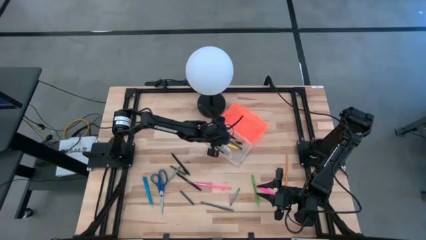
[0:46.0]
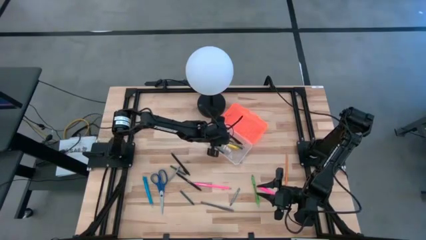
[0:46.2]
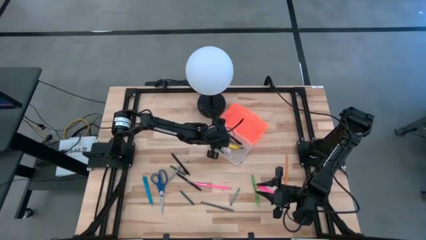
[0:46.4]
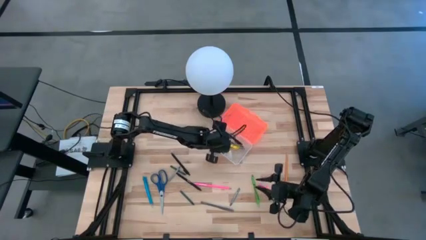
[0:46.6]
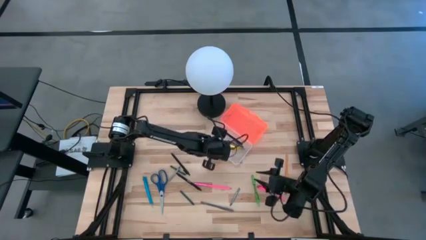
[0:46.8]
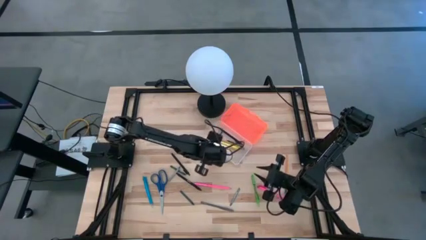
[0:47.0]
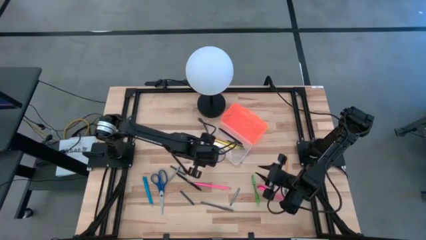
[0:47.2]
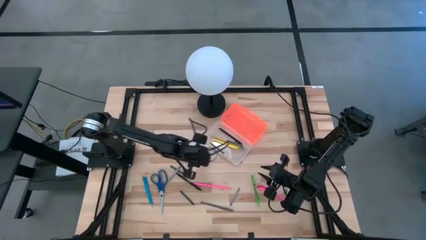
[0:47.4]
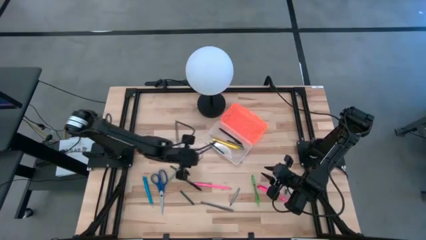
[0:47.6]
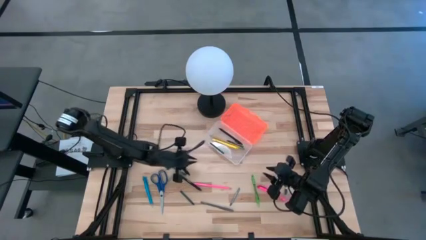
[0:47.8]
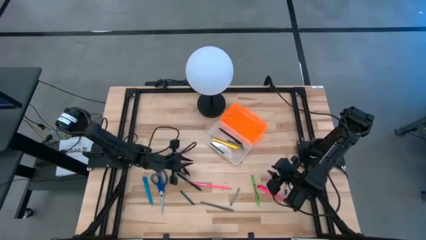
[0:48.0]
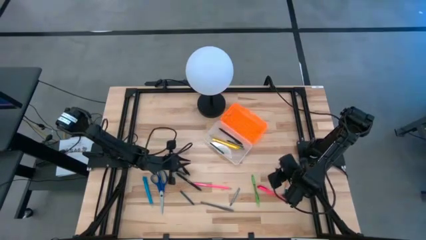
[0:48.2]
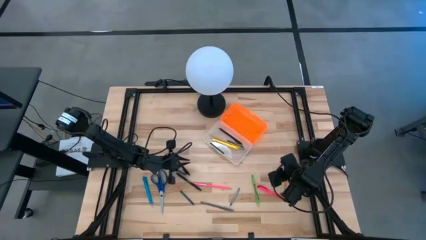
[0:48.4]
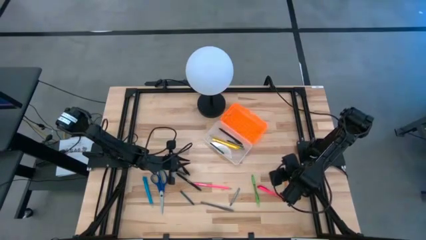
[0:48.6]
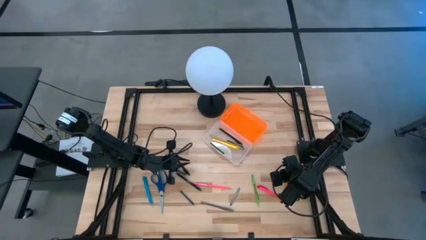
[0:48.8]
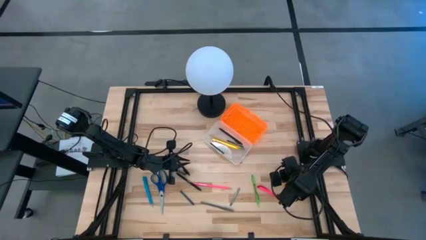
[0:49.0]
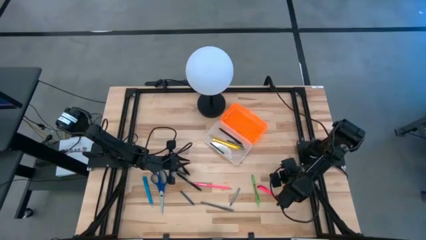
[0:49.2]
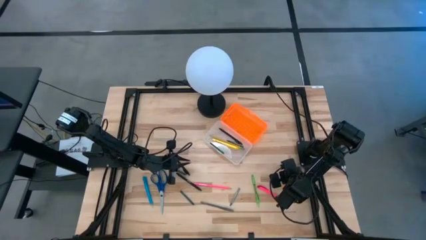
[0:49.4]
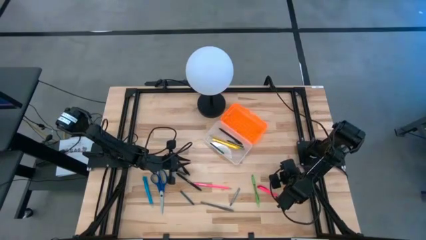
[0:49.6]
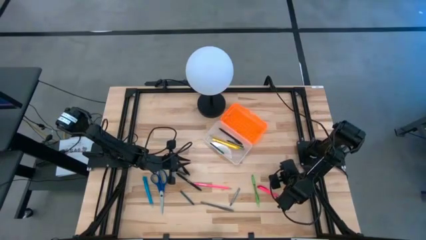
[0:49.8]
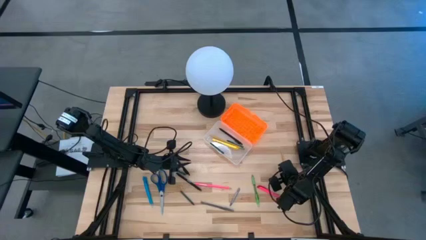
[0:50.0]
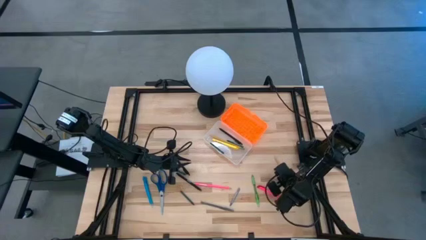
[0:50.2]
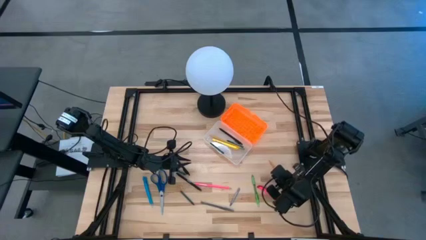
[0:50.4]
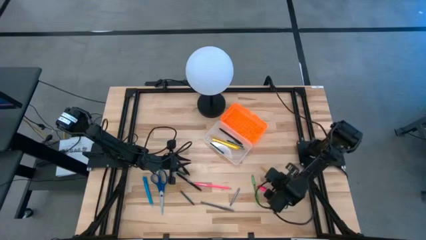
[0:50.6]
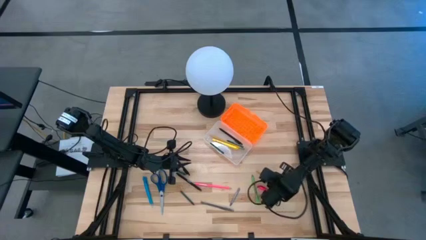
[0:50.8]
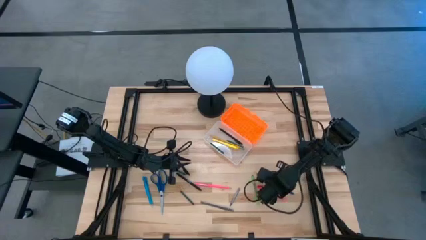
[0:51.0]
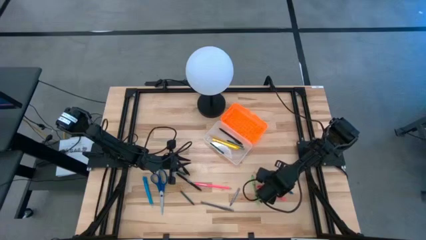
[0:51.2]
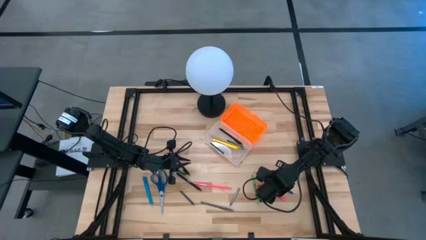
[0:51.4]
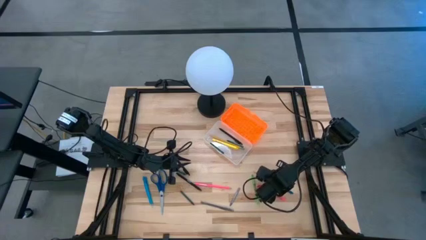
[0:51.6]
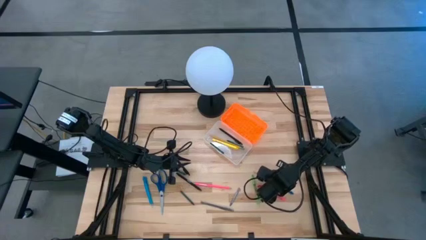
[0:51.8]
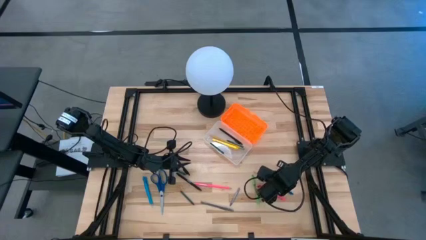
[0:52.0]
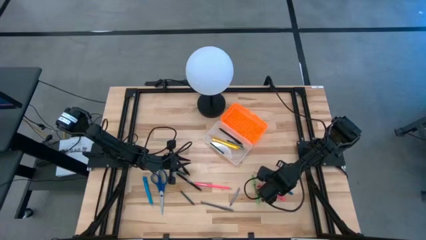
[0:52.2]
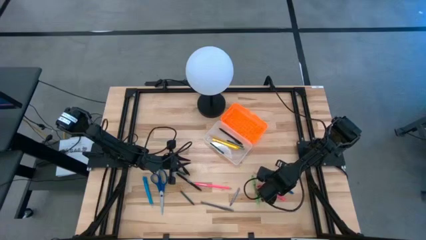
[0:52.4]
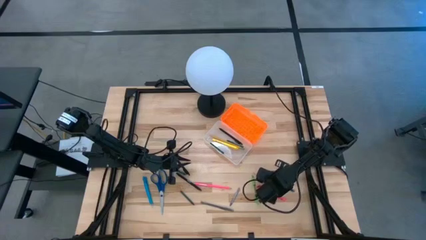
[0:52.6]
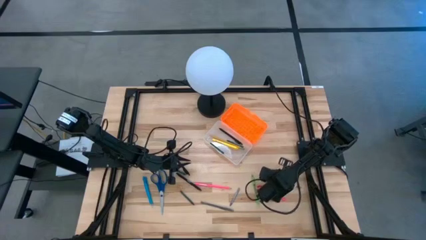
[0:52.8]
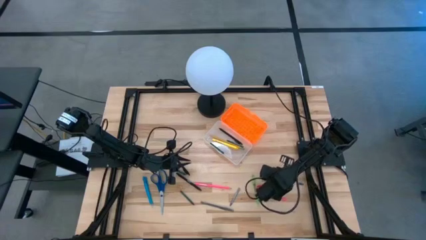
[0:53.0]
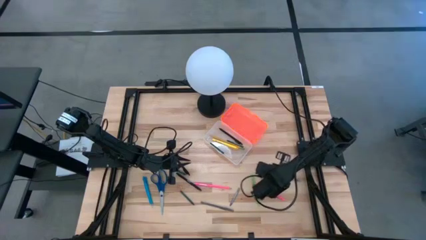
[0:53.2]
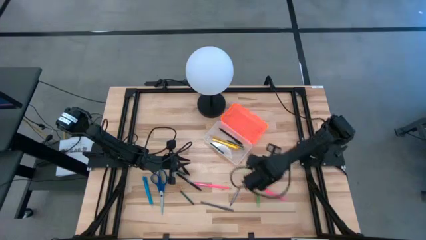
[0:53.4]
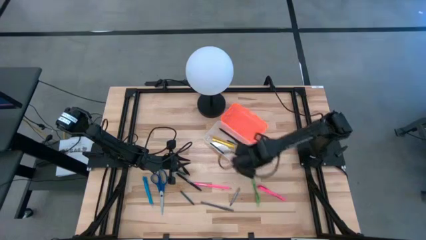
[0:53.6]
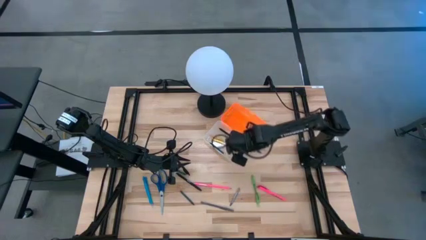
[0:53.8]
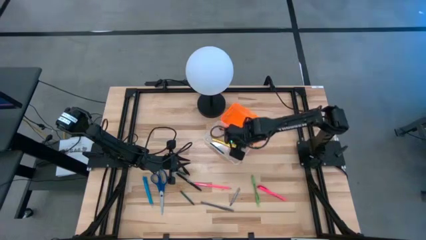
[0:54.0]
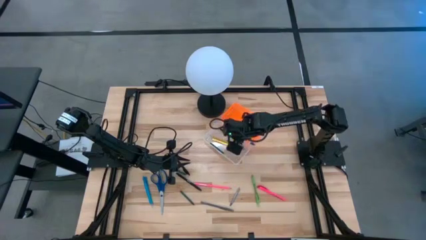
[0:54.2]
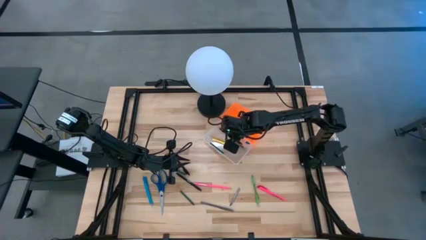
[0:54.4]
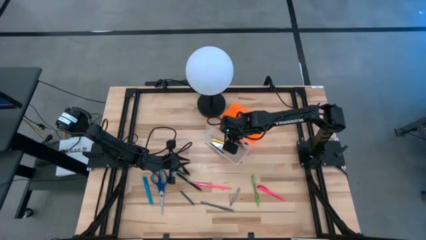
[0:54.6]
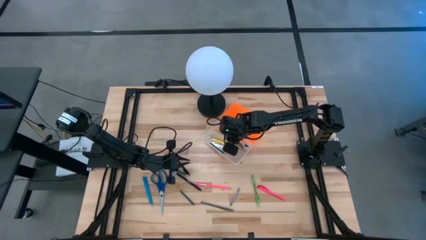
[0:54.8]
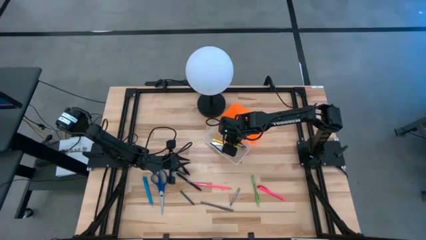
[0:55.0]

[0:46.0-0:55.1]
Task: Pick & place school supplies into a supply box
Put the orange pencil into the orange supply box

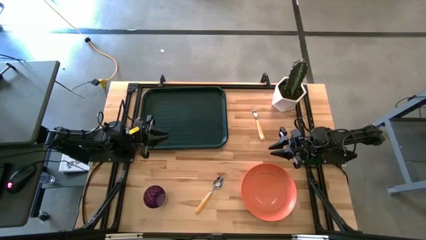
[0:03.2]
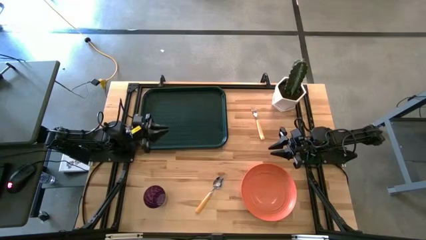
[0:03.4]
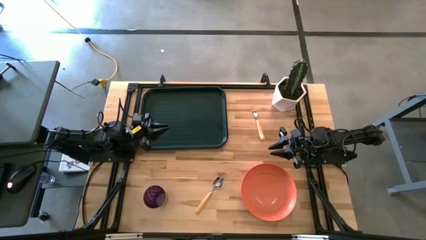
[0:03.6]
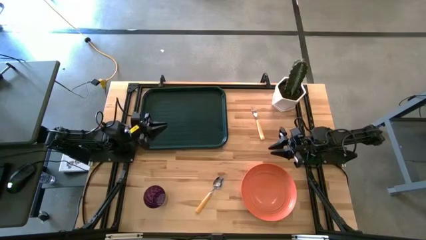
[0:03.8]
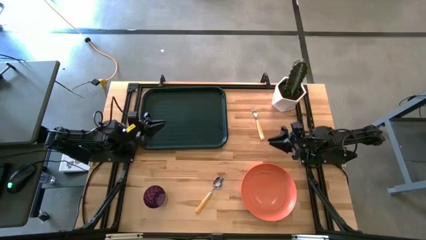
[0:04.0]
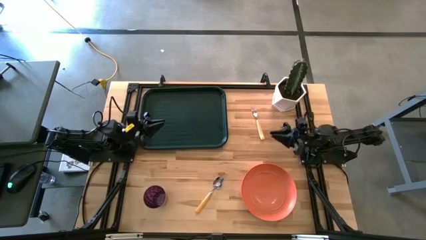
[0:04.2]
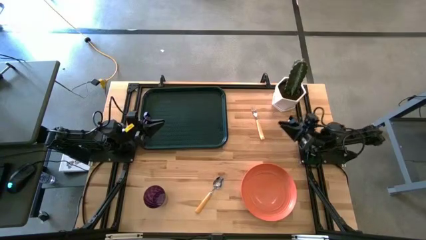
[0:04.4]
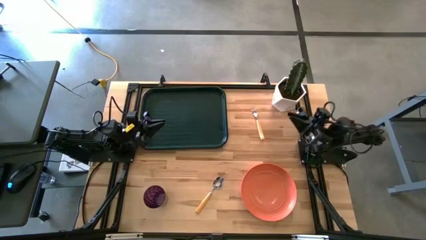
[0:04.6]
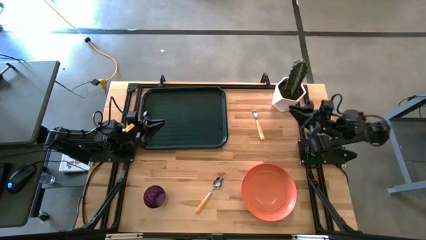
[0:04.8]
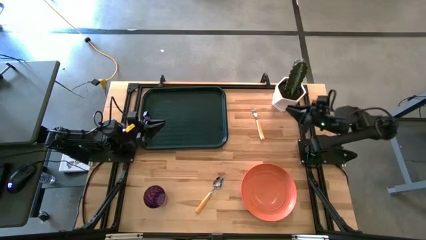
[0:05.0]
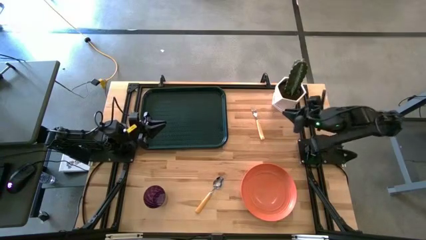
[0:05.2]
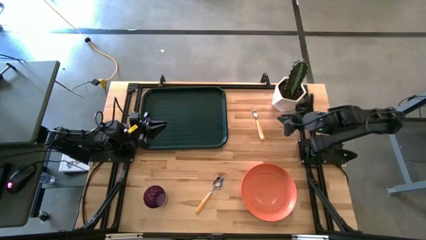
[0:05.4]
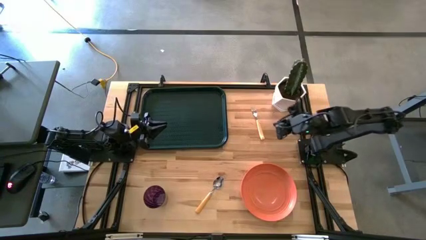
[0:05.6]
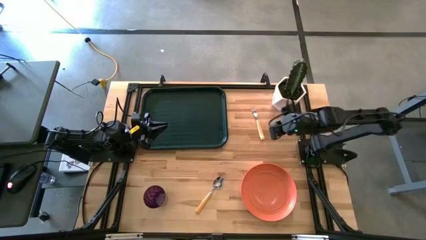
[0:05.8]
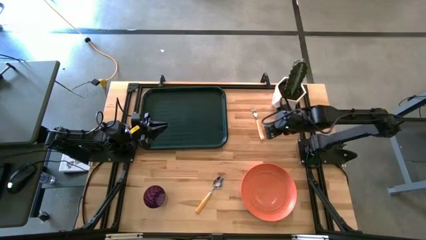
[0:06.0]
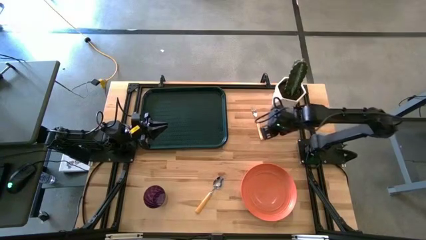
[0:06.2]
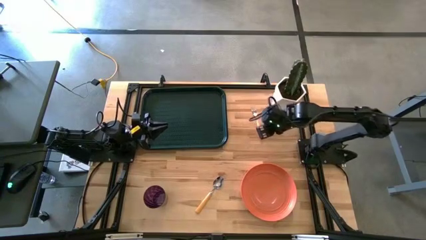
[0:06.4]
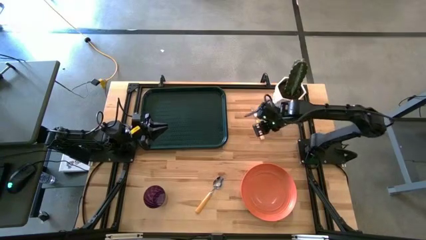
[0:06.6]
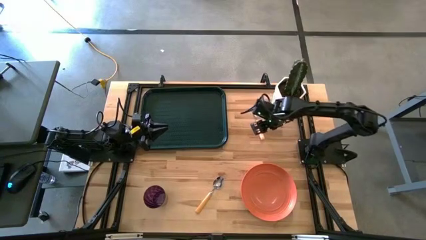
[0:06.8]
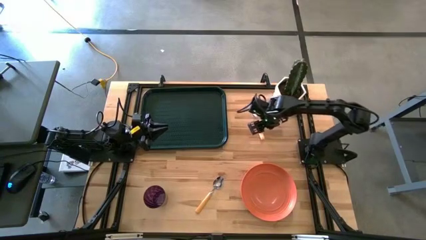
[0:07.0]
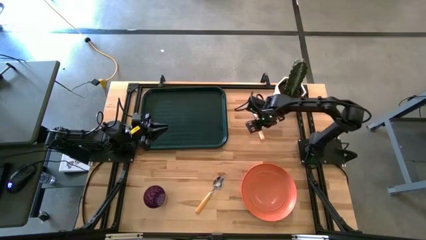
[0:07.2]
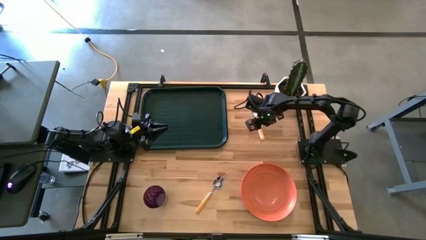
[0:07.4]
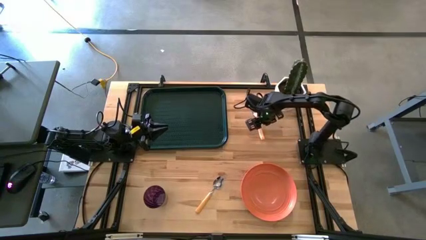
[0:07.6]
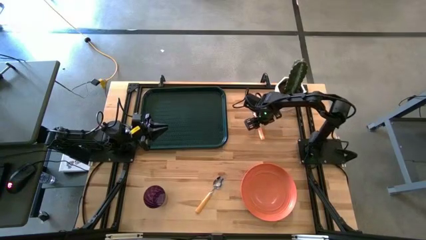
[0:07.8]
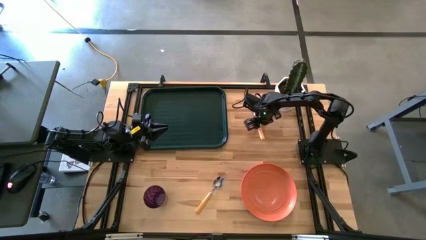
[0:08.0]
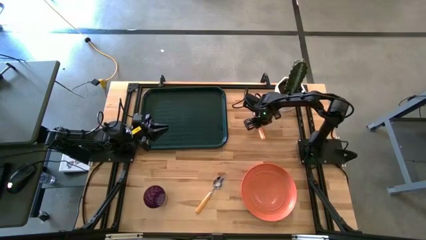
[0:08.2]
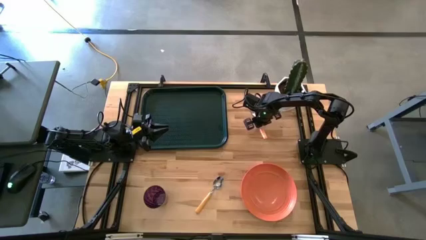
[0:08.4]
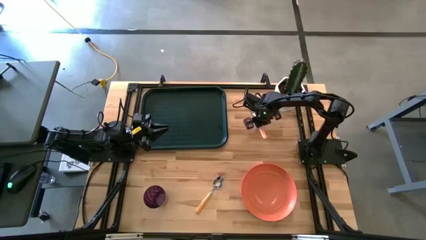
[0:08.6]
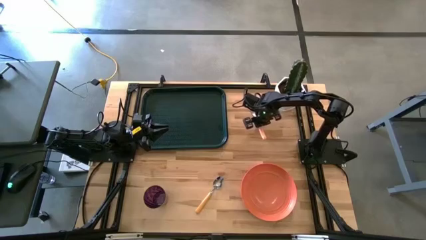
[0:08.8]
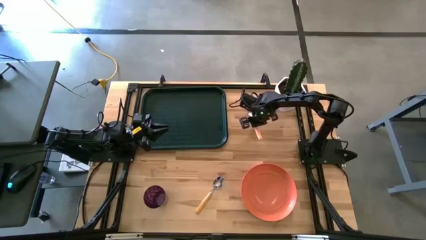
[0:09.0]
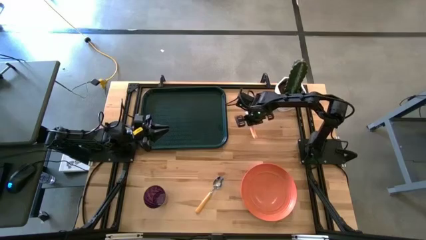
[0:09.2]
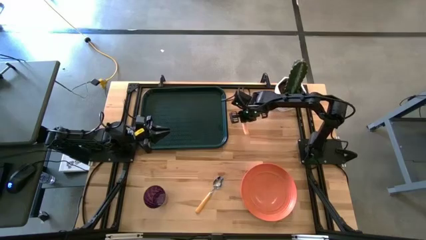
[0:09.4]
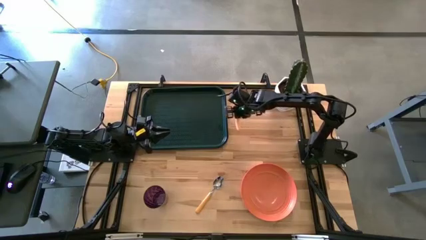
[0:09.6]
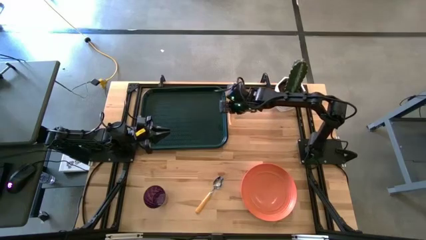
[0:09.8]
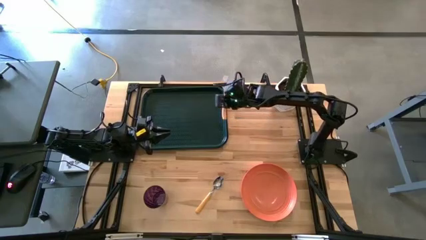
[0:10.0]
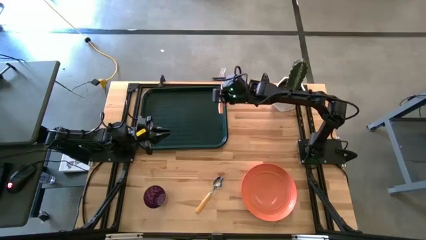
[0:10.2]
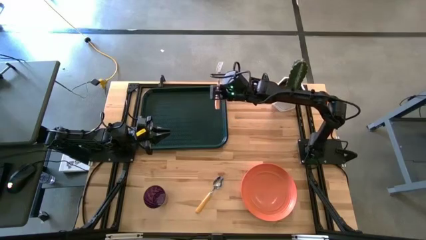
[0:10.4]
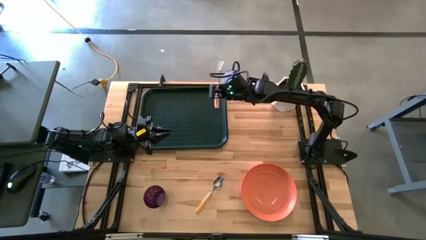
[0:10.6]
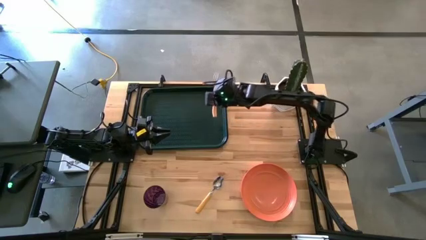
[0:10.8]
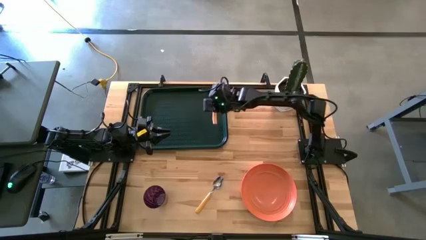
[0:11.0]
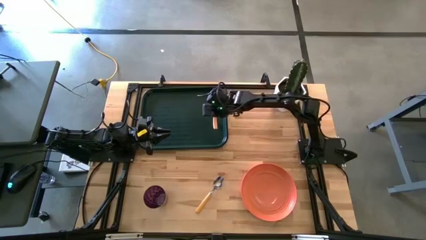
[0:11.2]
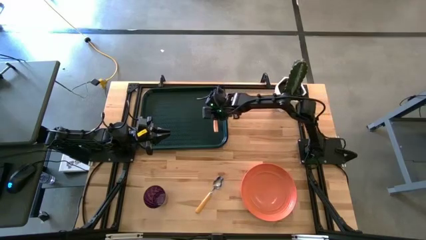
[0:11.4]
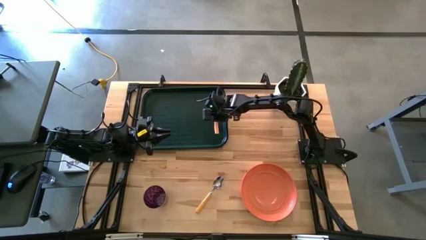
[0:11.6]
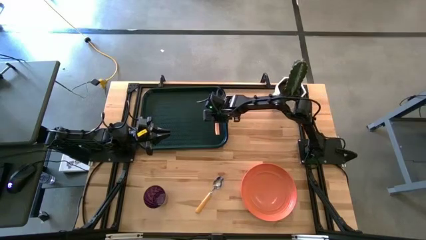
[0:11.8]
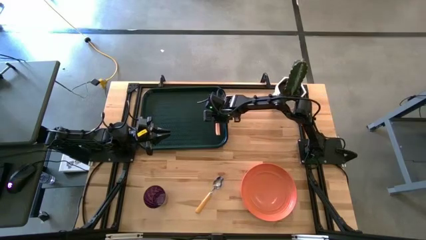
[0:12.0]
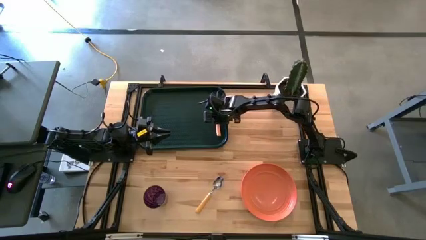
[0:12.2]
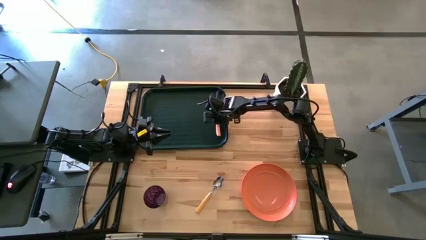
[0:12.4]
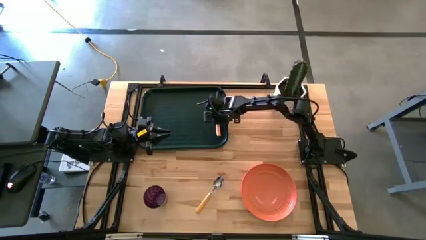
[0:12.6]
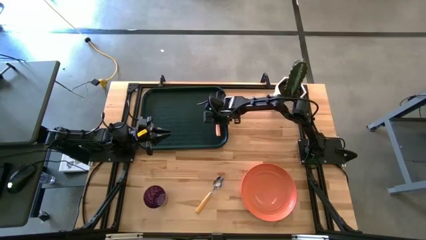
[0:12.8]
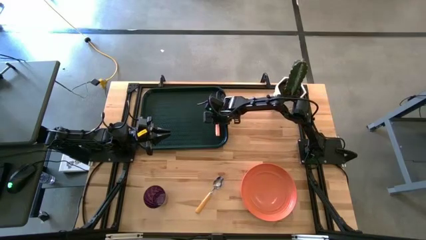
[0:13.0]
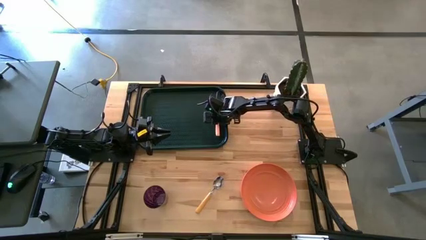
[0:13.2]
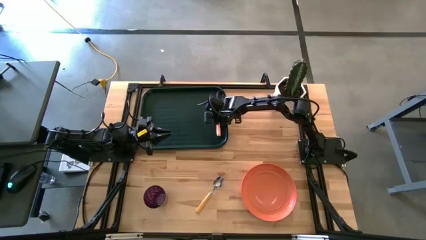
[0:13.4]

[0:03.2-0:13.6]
Task: Pick and place plate/cup/fork/spoon on tray
Put the light orange fork on the right side of the black tray
